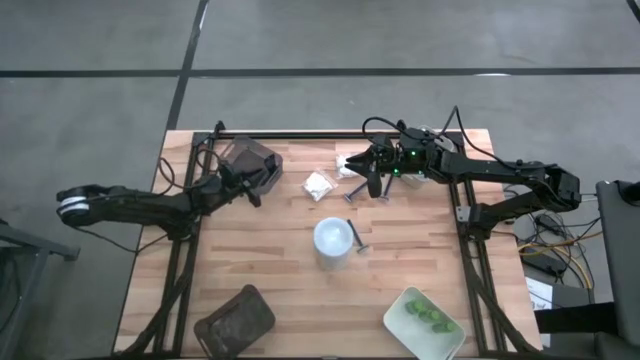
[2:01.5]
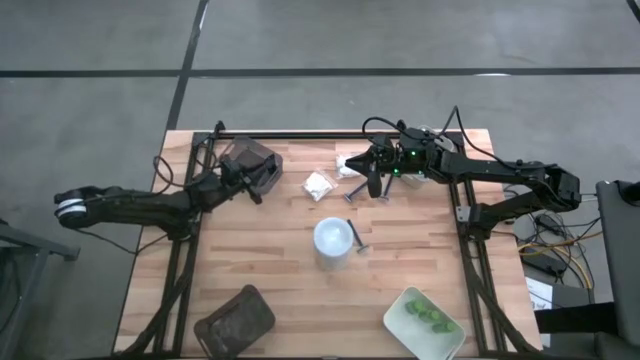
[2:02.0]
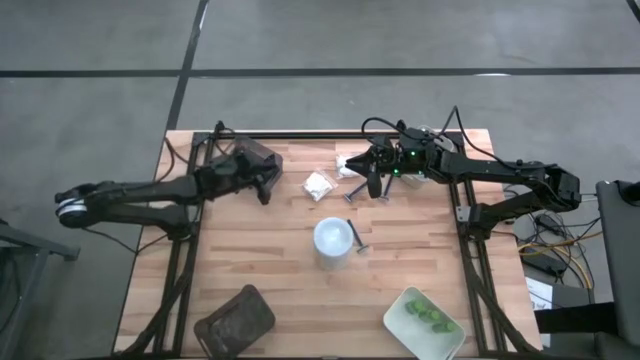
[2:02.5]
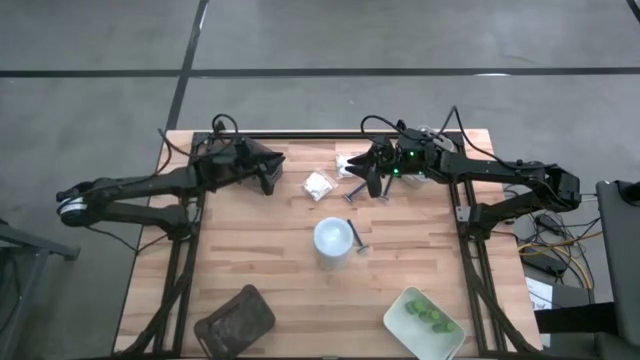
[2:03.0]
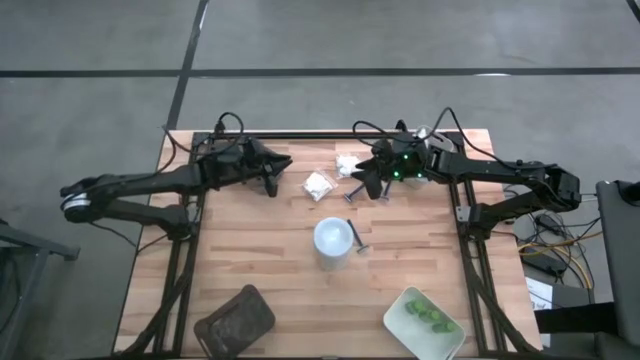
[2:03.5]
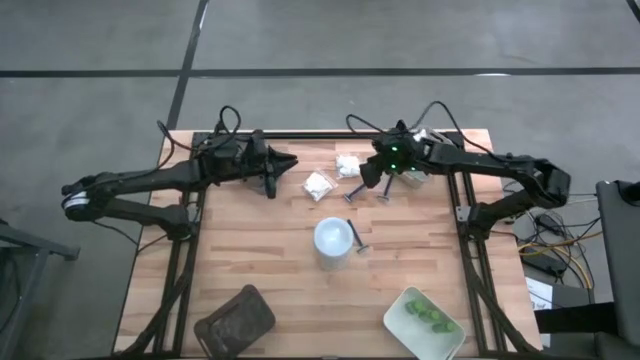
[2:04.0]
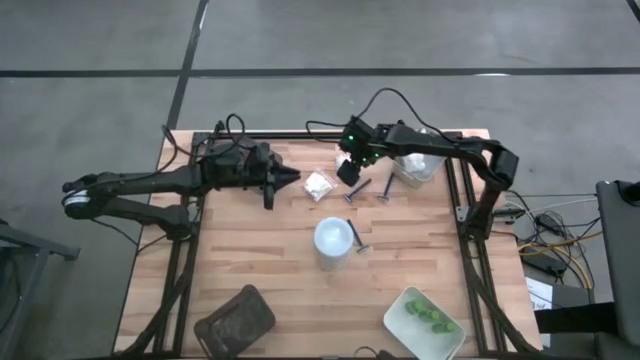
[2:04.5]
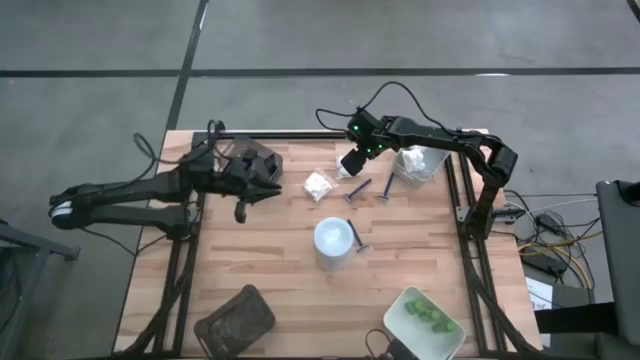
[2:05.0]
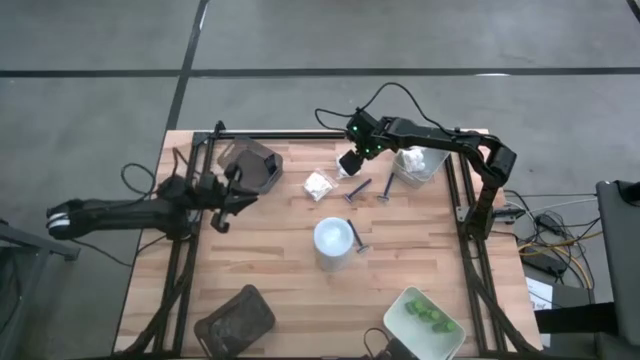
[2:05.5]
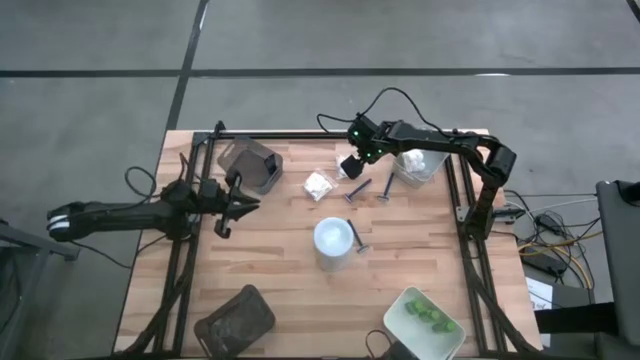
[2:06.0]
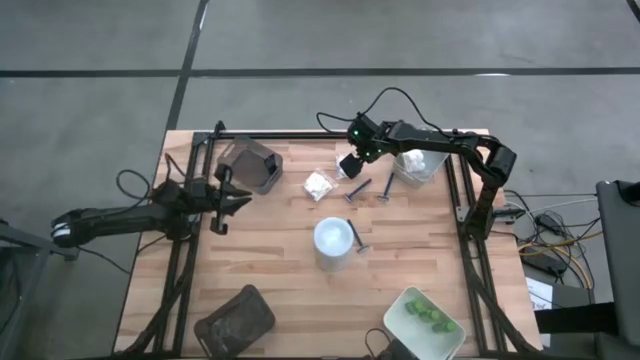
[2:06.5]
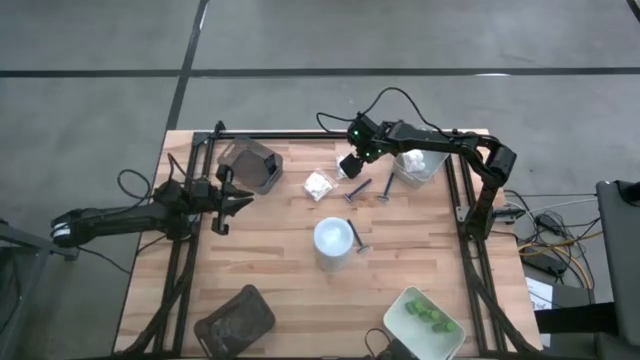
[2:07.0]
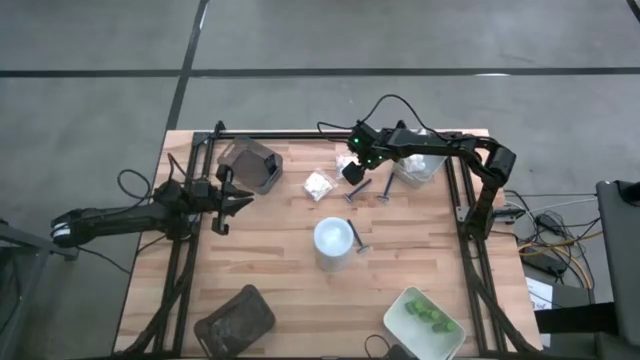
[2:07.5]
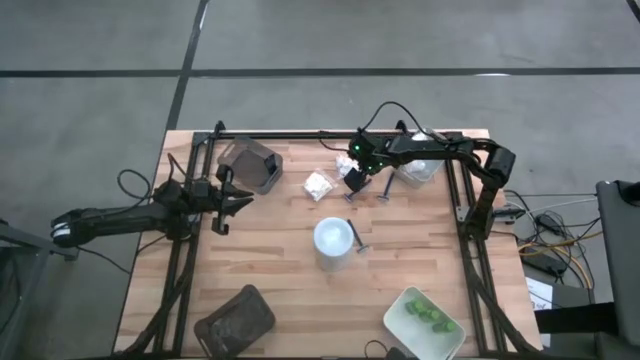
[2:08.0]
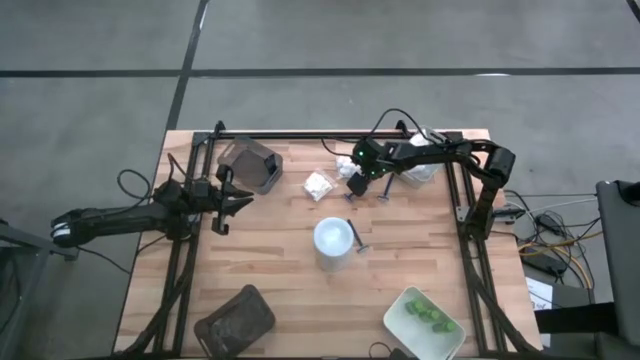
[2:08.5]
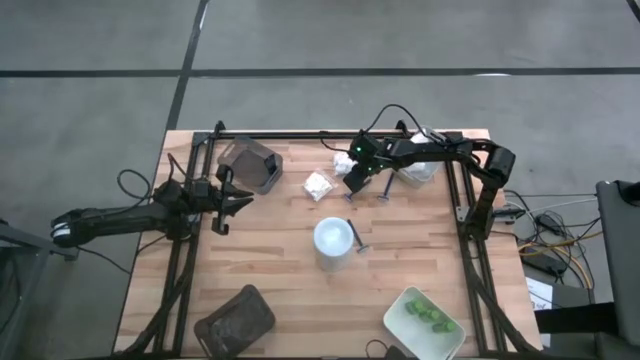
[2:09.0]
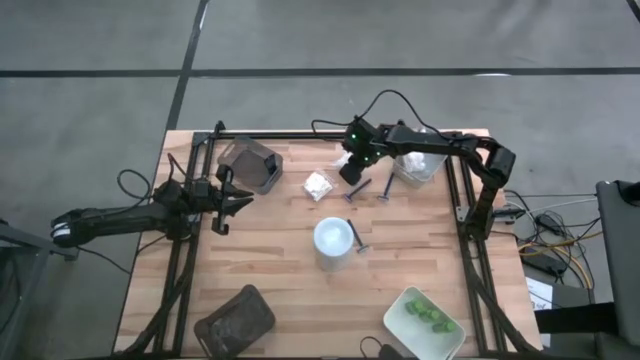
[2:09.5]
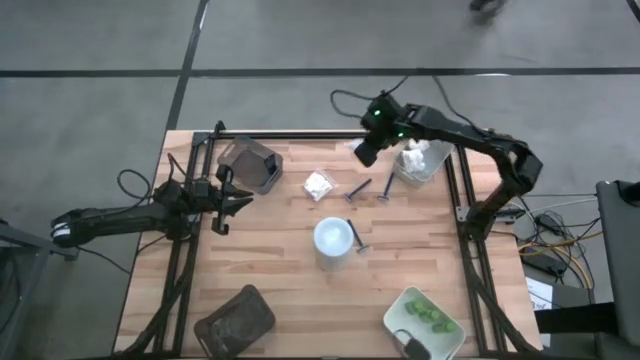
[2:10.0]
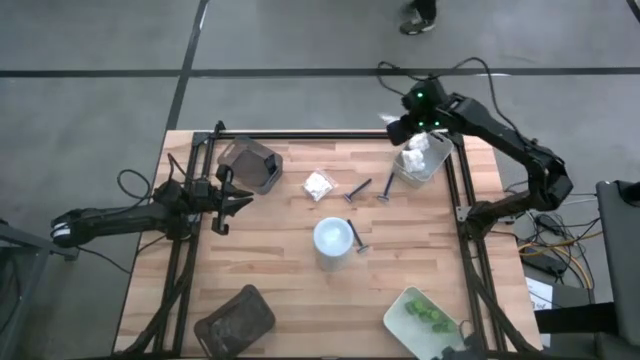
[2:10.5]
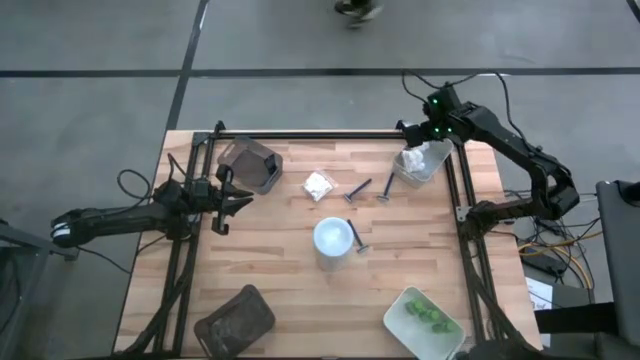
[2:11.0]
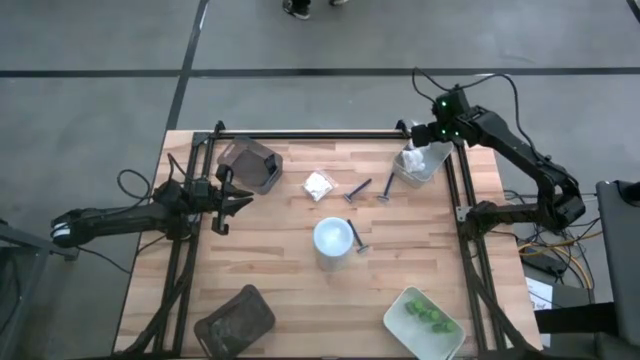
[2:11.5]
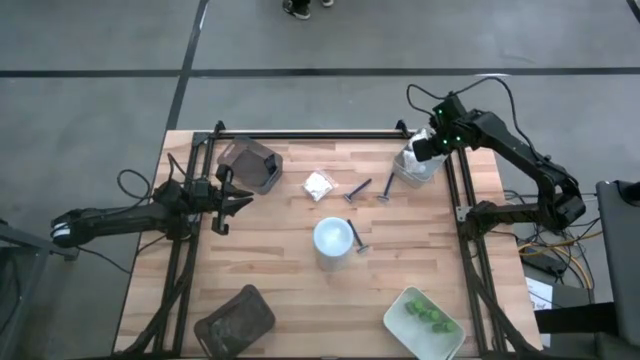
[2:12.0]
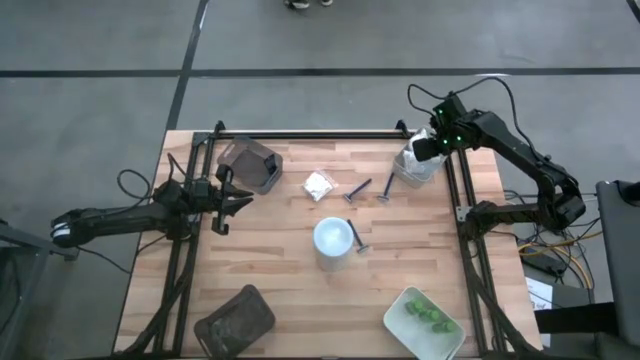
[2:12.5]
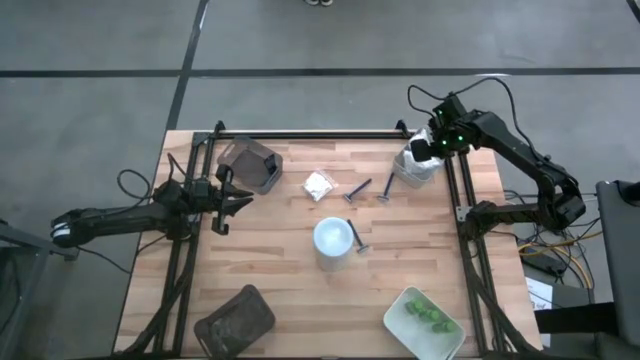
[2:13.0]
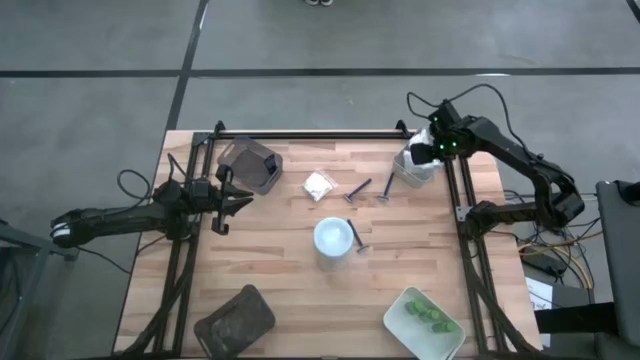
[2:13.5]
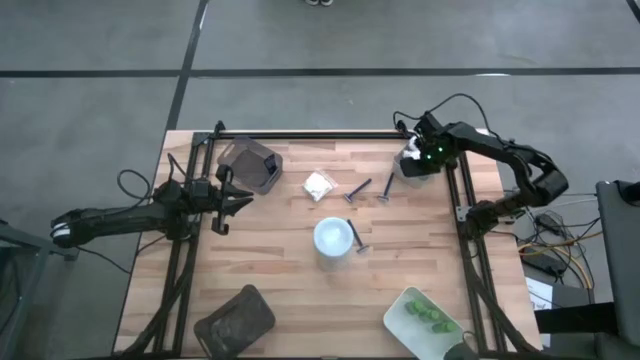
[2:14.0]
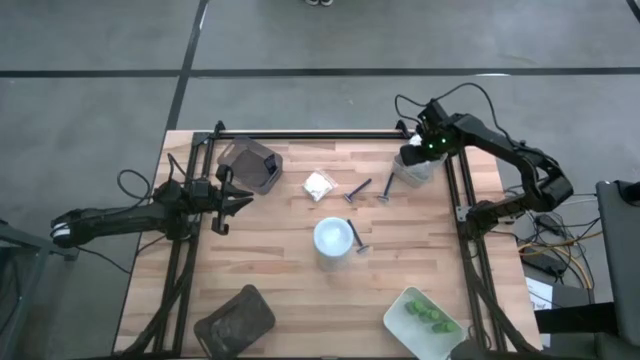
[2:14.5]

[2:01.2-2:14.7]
Task: Pick & Place Travel size toiletries
Put the white cotton pack into the gray bin

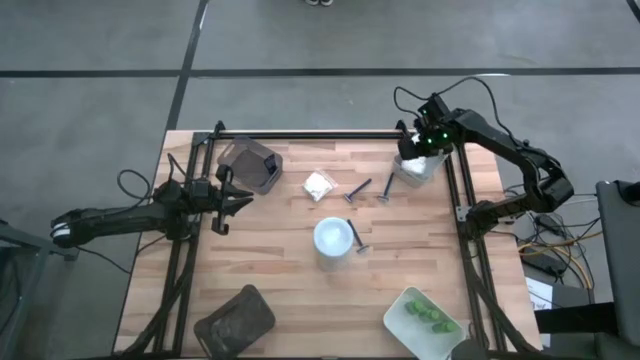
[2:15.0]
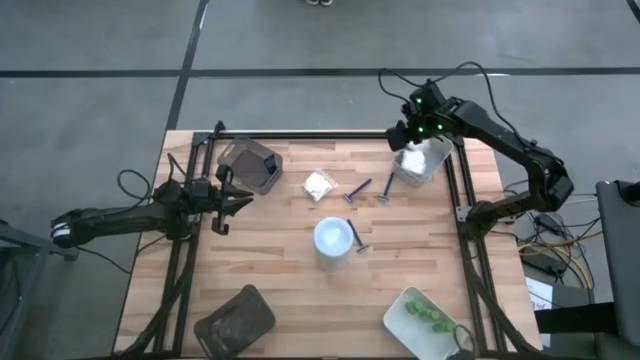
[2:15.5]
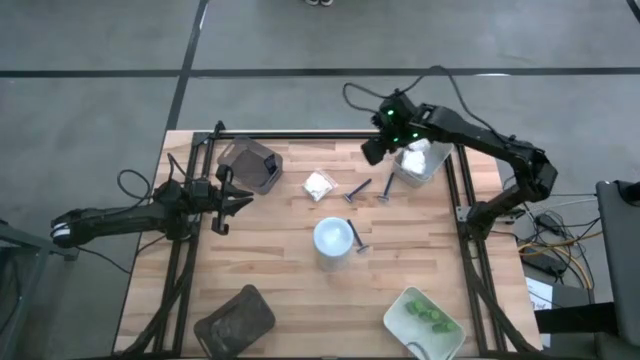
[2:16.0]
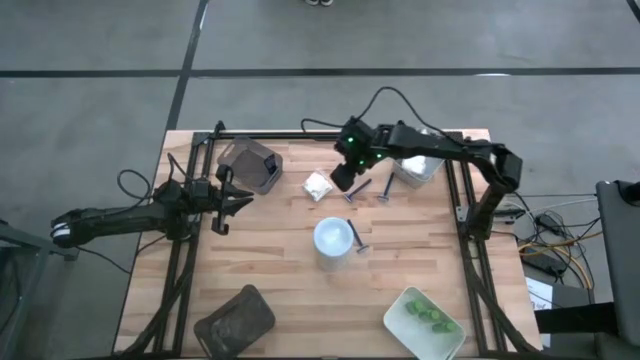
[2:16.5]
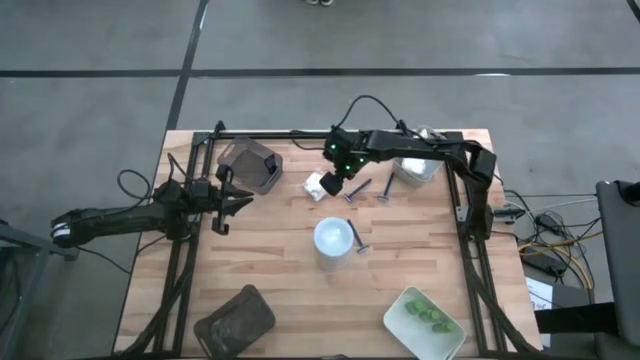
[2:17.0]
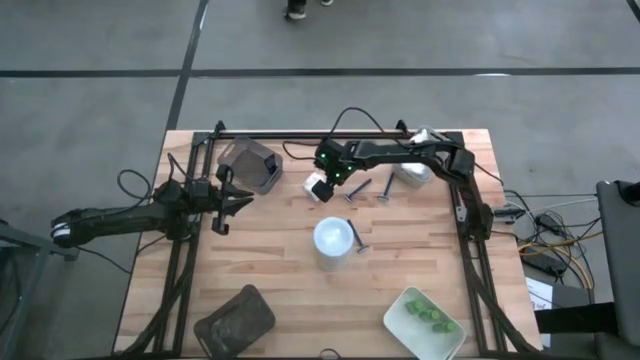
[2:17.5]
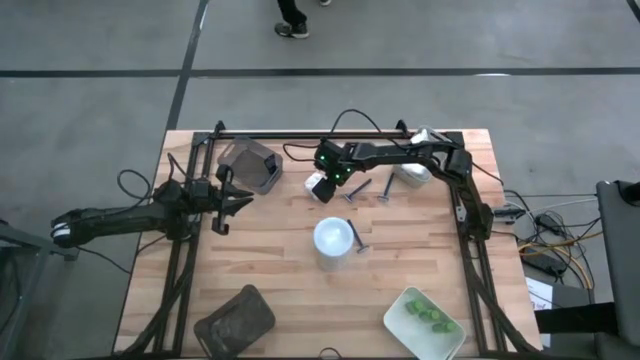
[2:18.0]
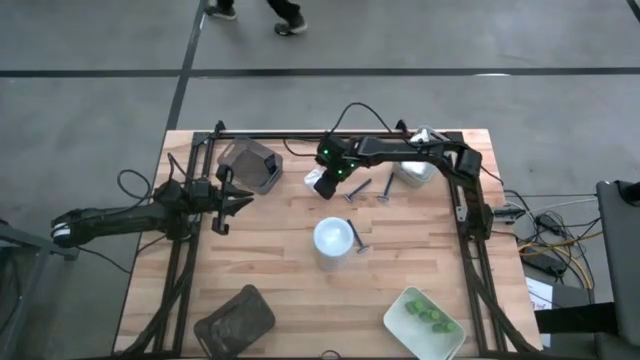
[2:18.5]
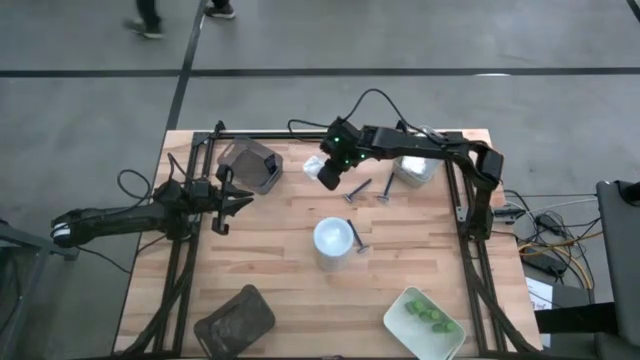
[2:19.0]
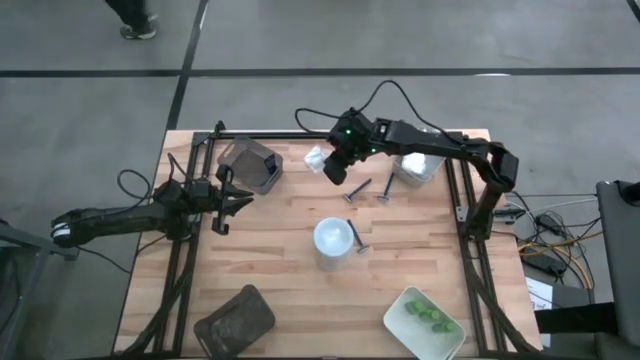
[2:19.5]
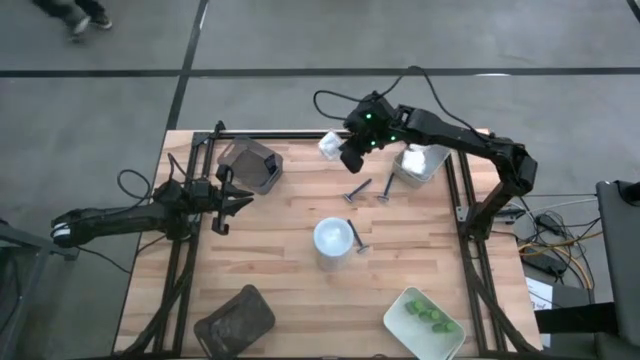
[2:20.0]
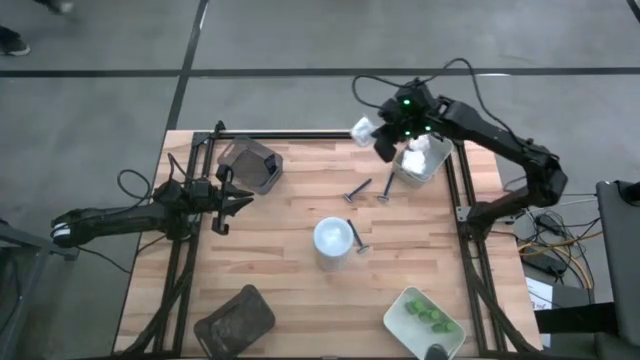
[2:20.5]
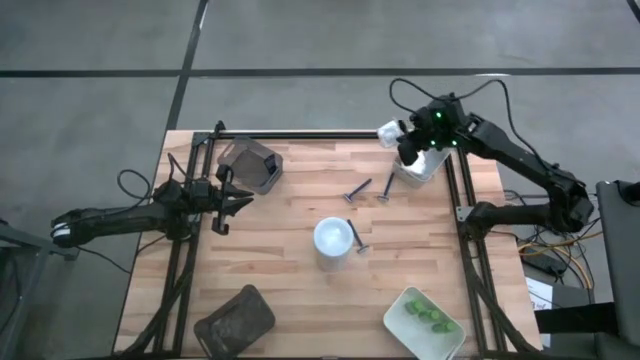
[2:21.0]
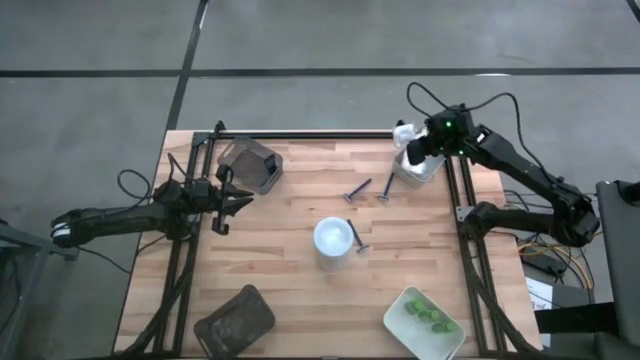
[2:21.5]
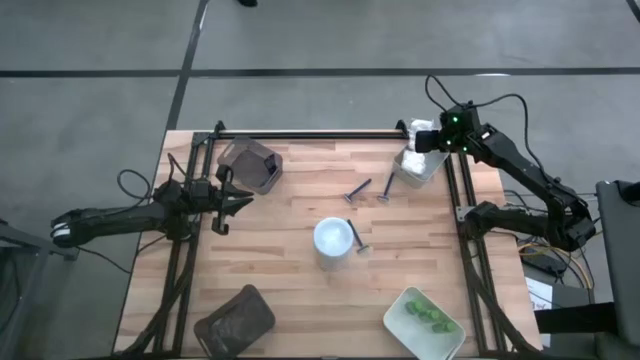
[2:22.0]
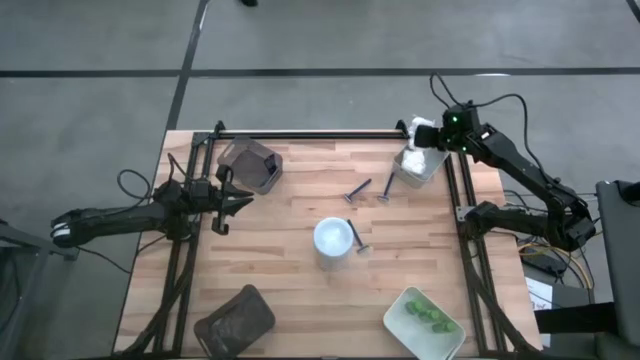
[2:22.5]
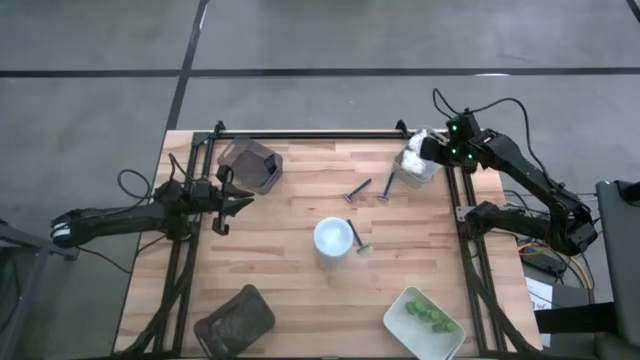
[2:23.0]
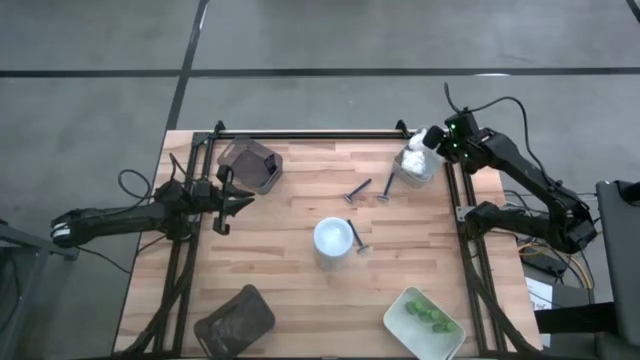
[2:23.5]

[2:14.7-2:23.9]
Put the cotton pack into the gray bin
